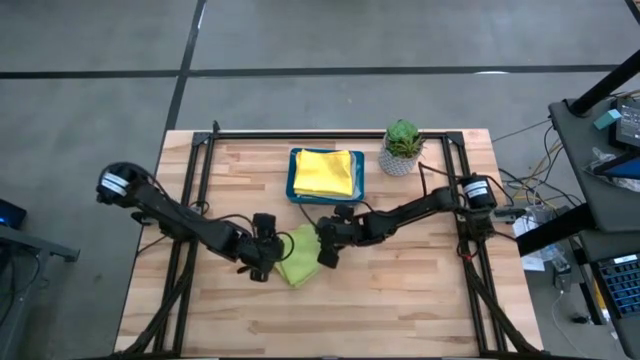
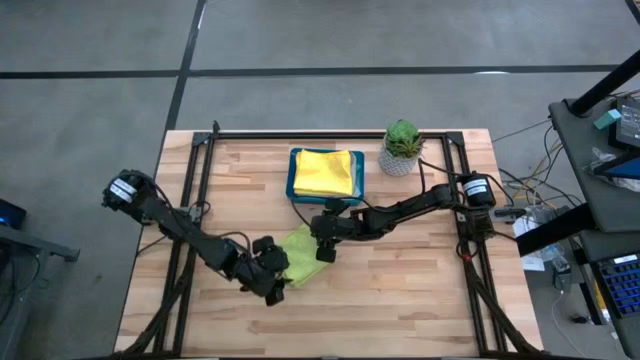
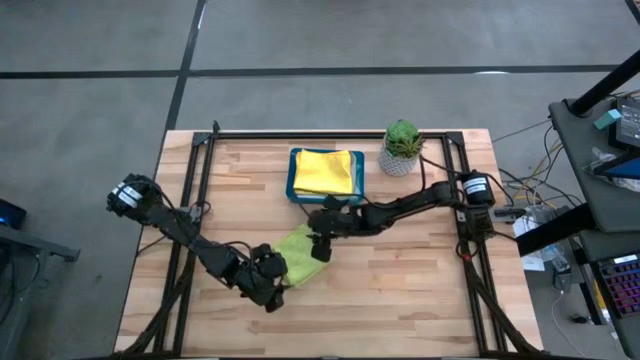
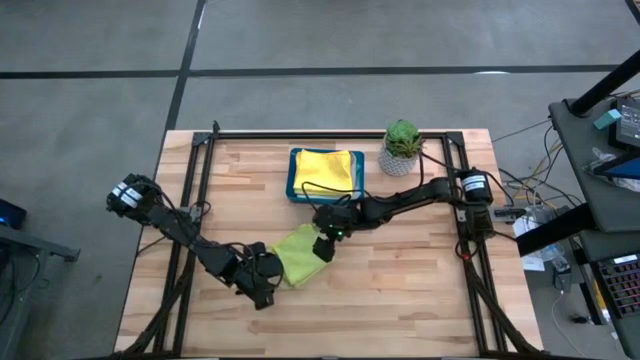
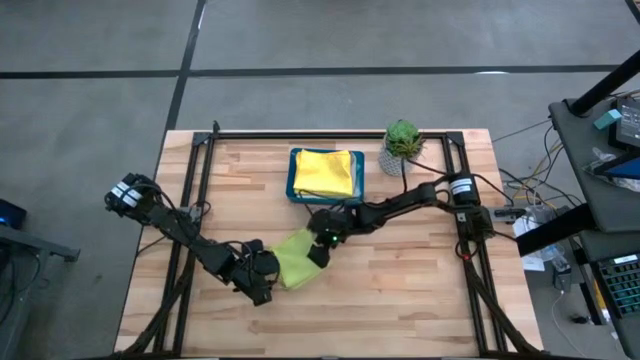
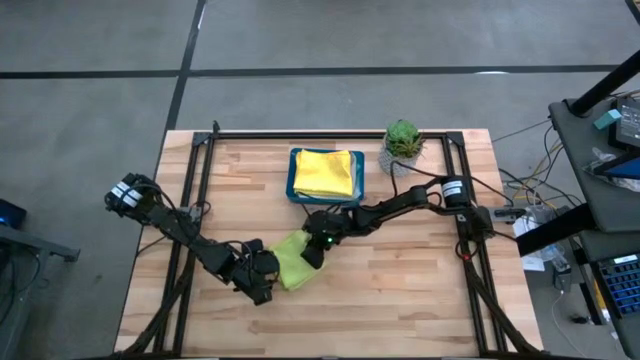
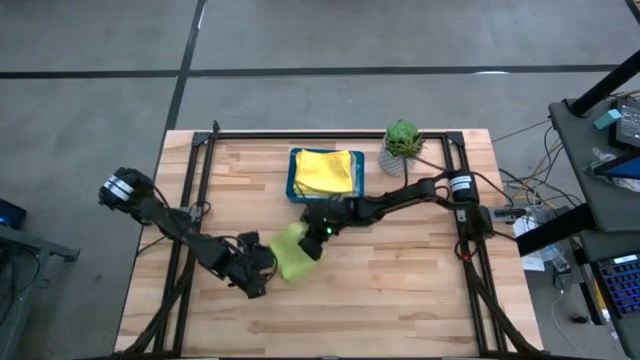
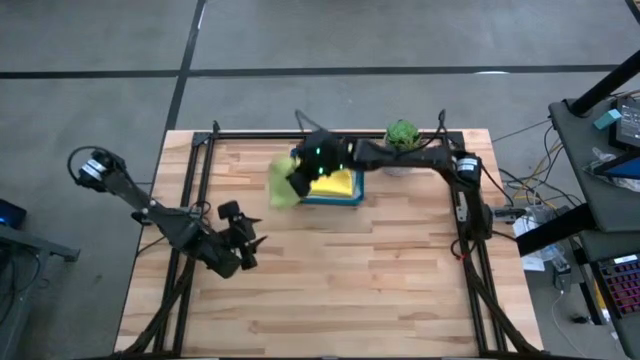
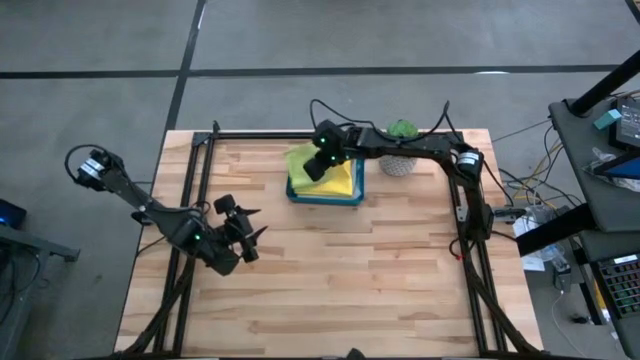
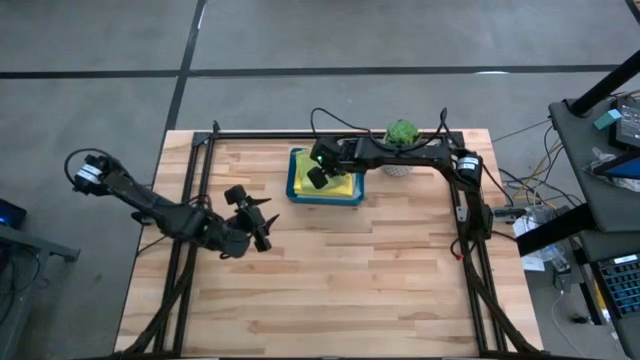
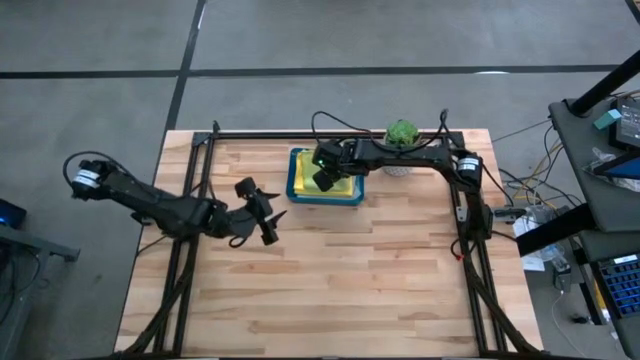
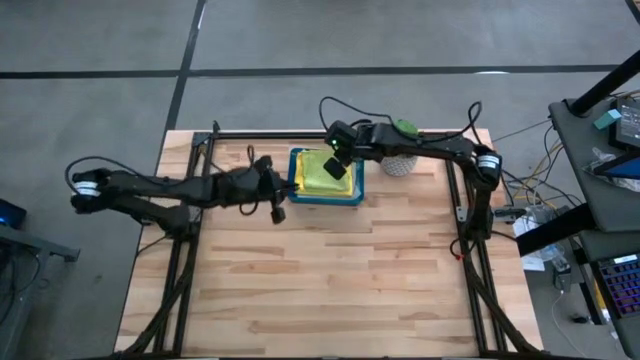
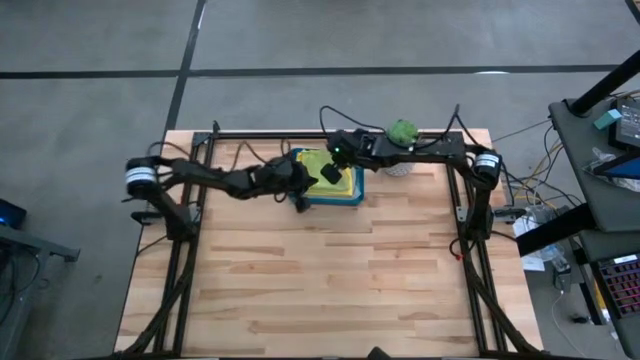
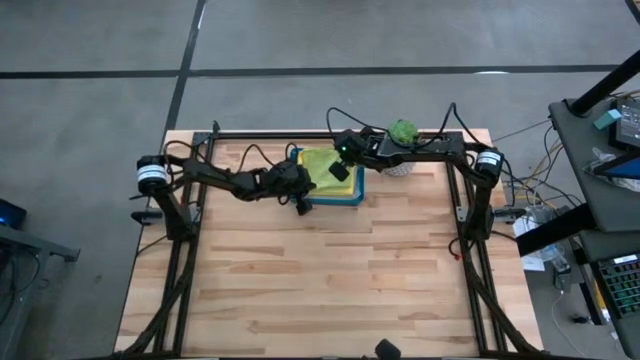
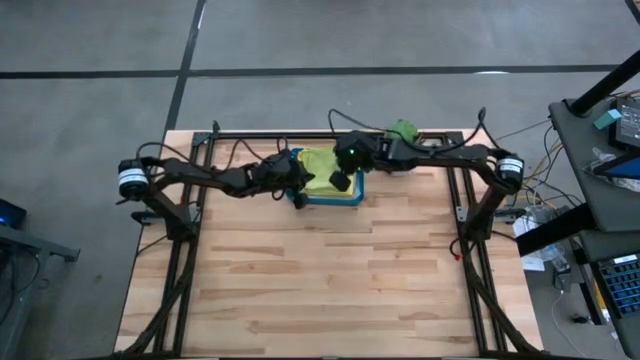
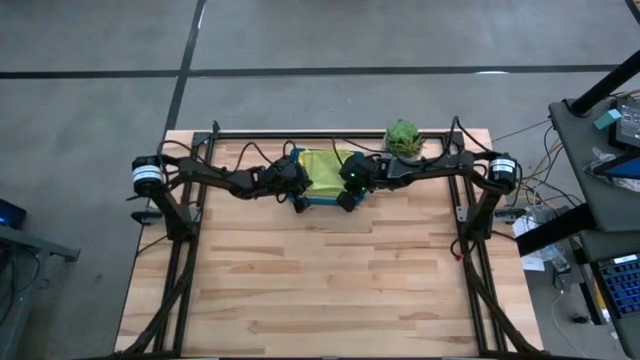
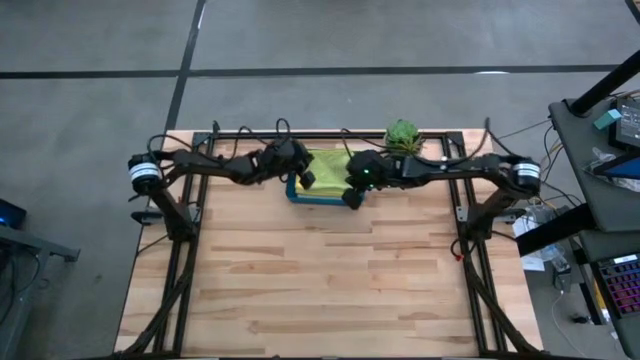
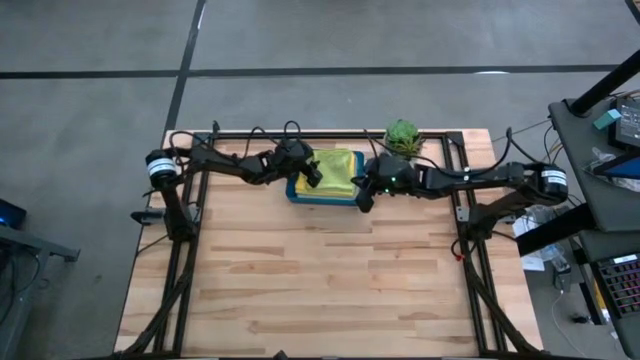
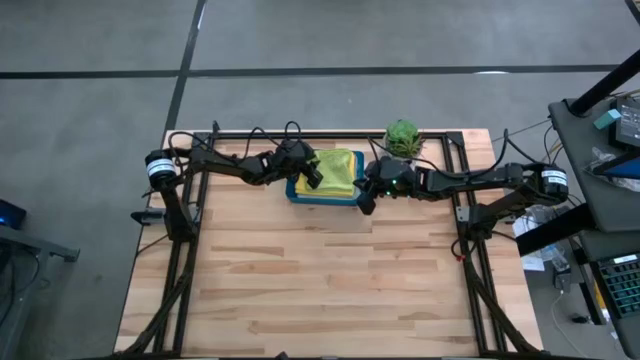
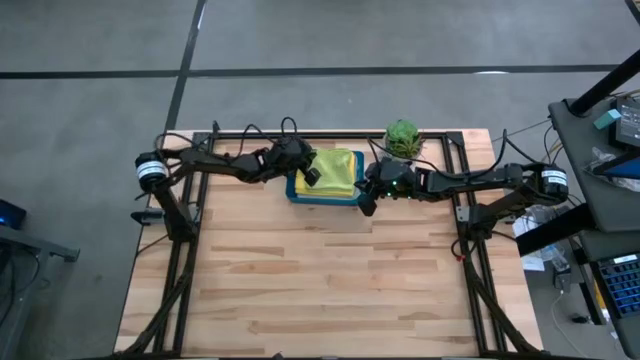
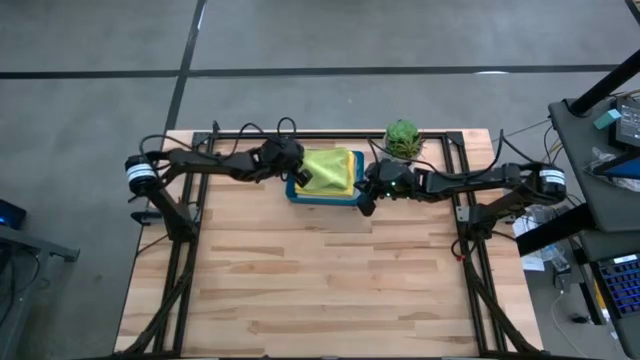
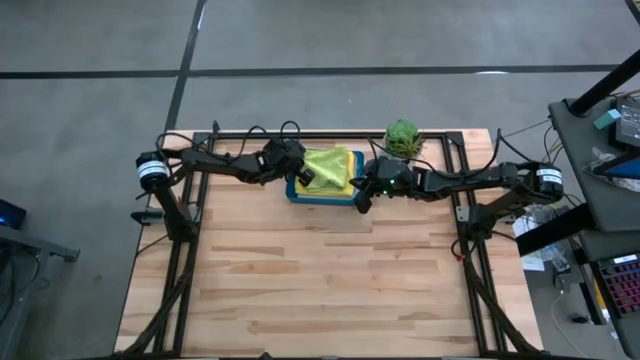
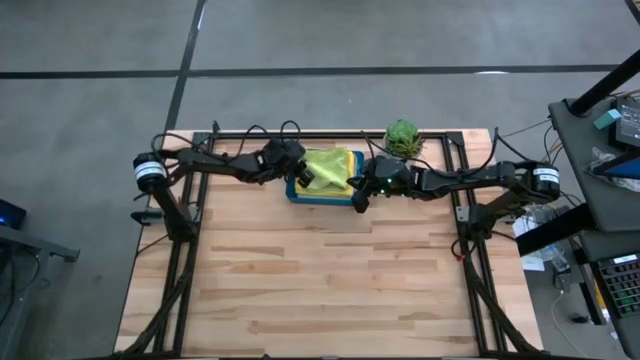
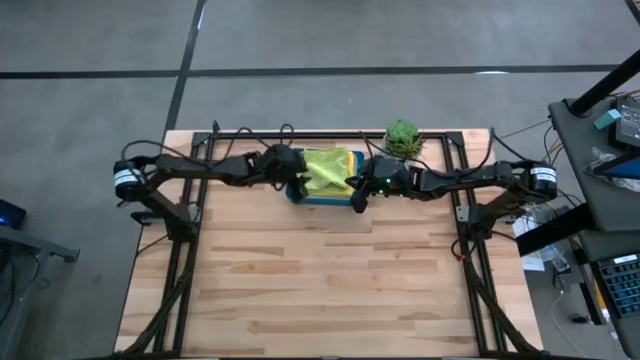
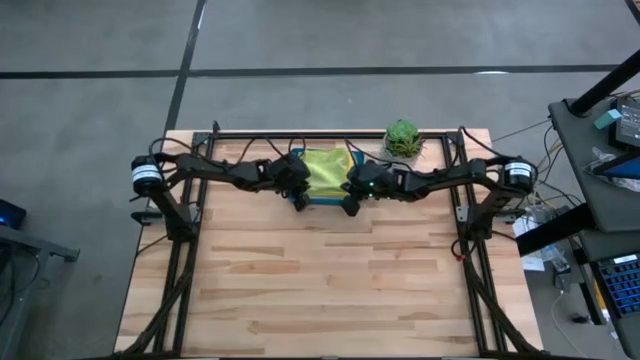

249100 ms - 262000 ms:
Task: Fold microfiber towels
Put the folded green microfiber cloth into the bin

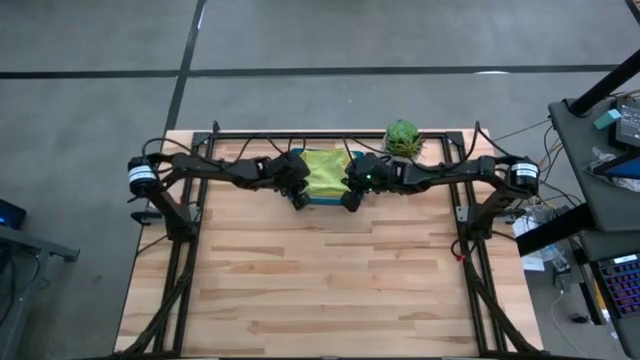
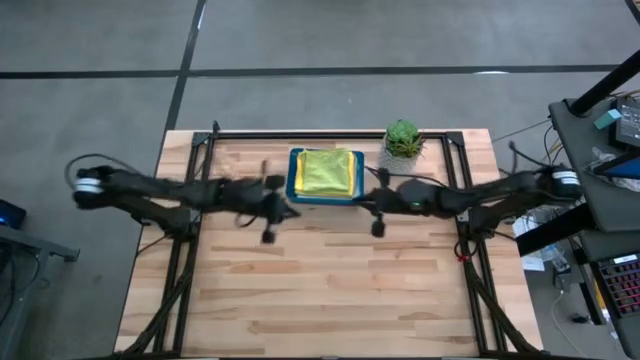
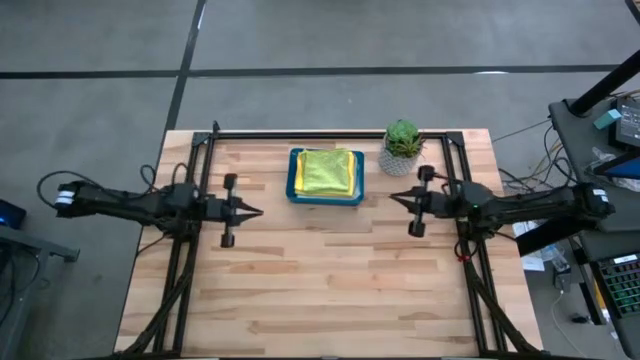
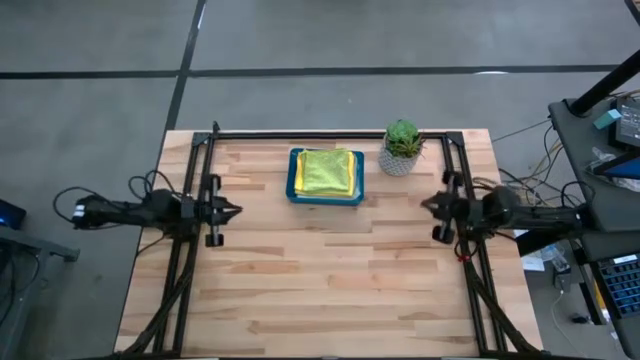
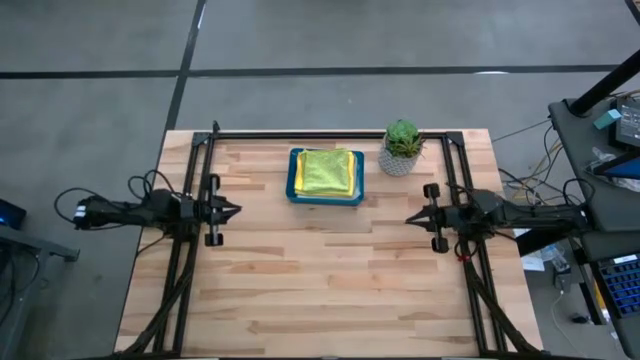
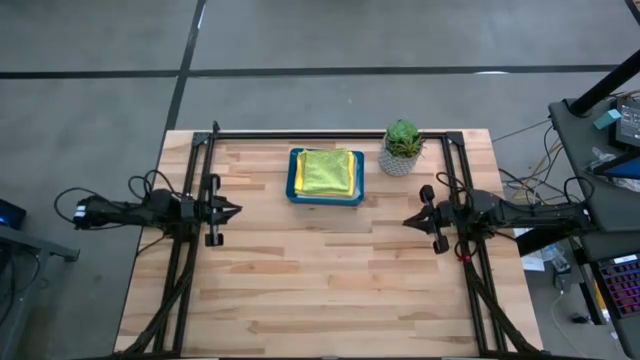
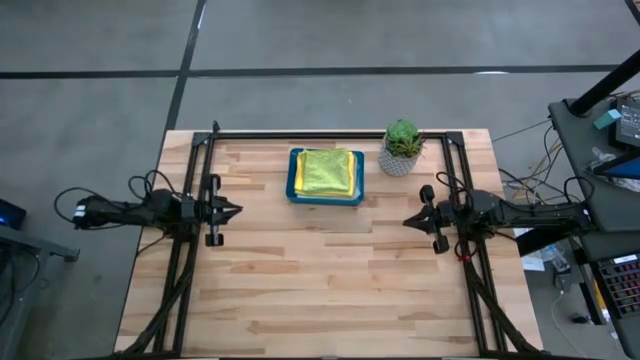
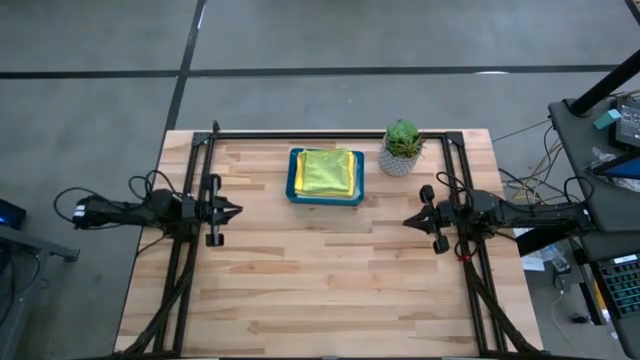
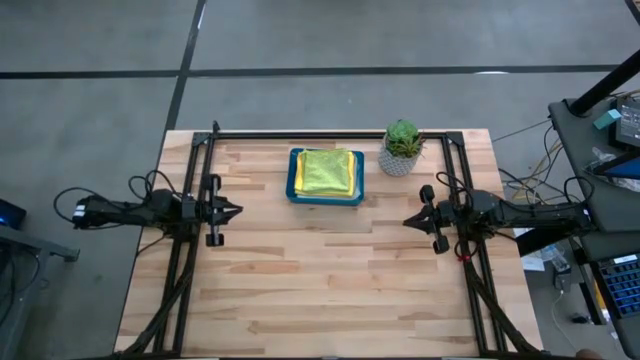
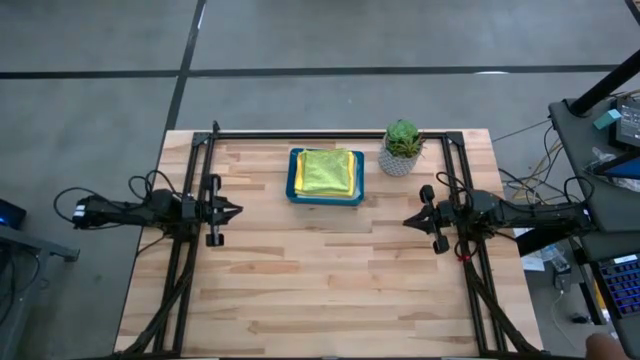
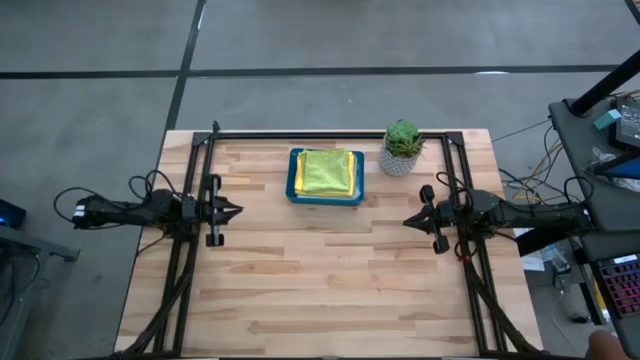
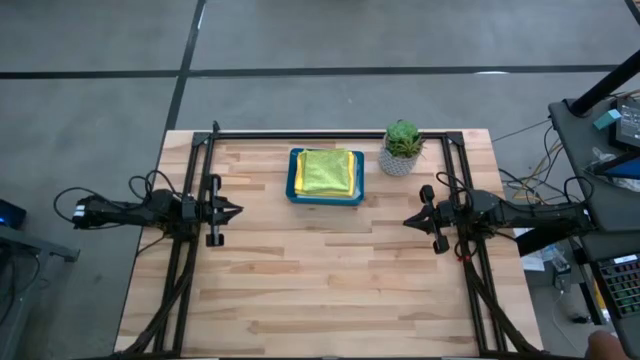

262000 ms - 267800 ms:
Return to Home Position
